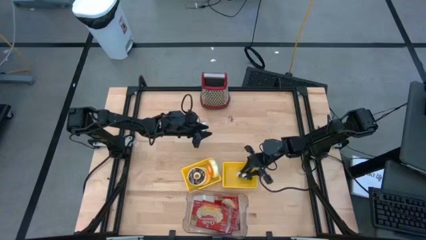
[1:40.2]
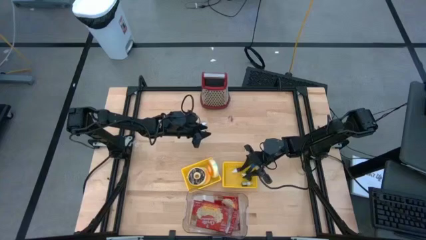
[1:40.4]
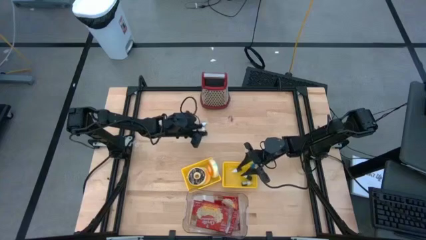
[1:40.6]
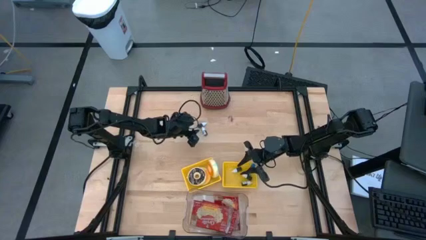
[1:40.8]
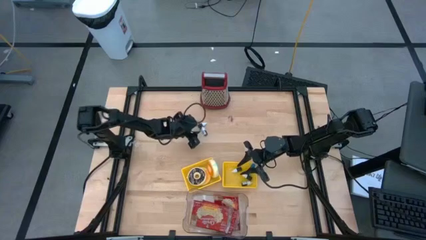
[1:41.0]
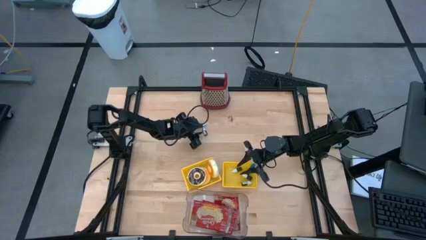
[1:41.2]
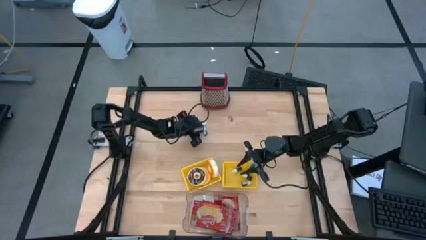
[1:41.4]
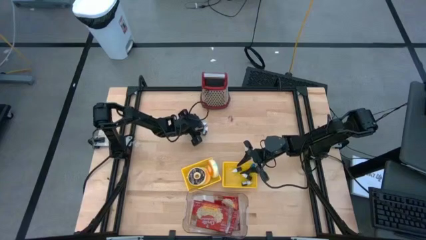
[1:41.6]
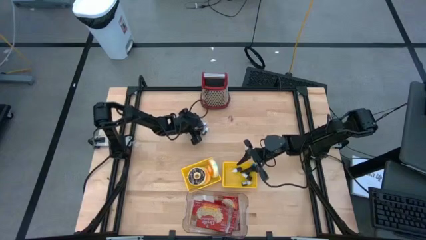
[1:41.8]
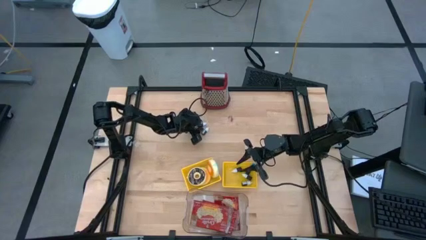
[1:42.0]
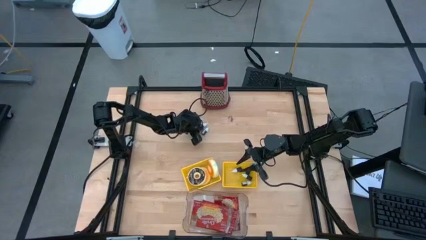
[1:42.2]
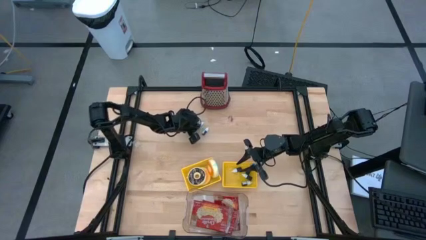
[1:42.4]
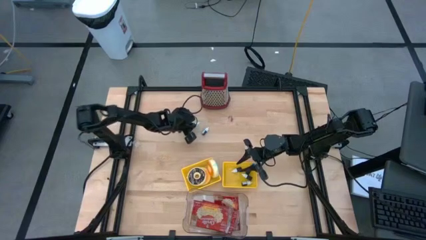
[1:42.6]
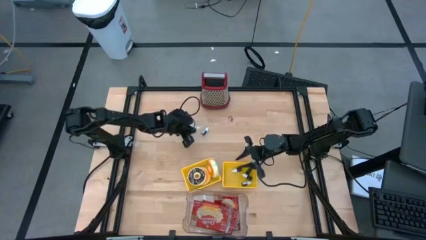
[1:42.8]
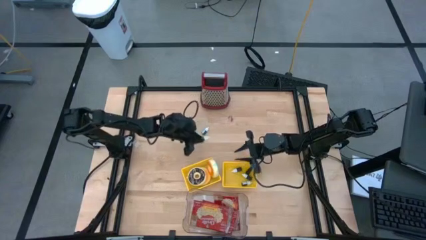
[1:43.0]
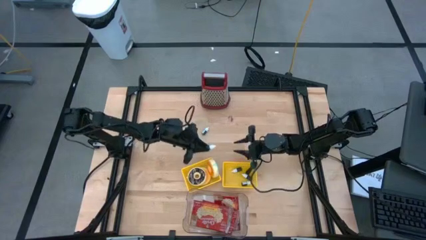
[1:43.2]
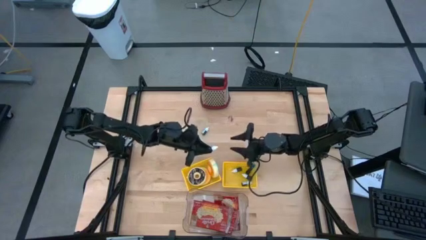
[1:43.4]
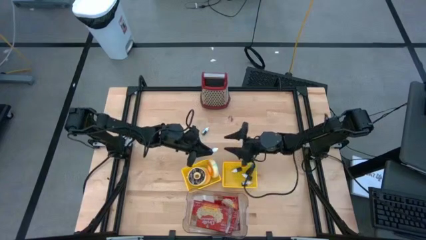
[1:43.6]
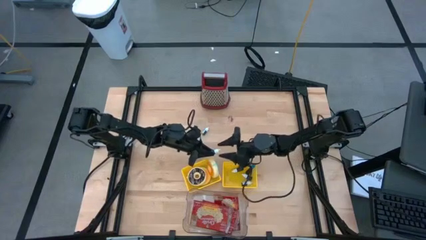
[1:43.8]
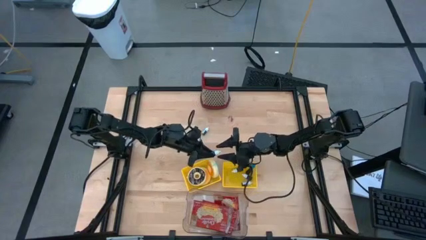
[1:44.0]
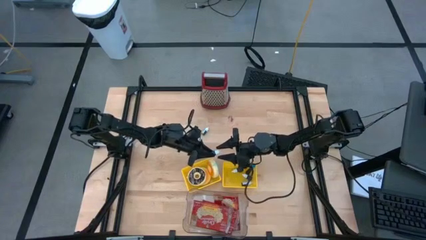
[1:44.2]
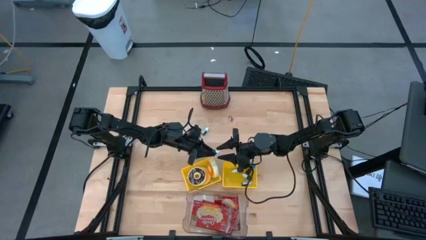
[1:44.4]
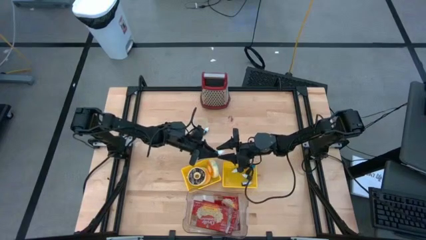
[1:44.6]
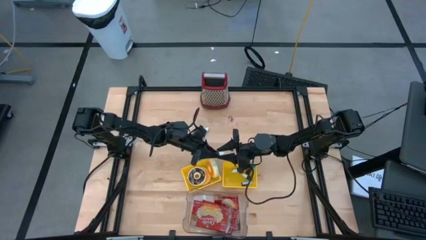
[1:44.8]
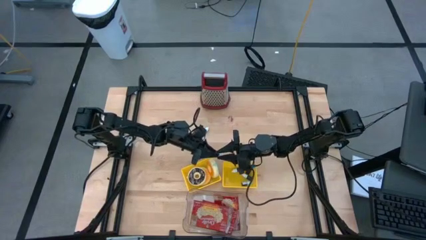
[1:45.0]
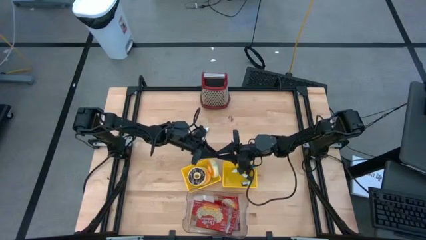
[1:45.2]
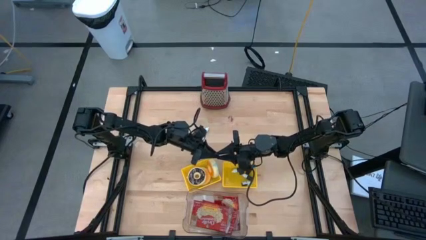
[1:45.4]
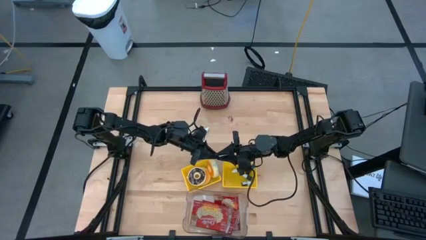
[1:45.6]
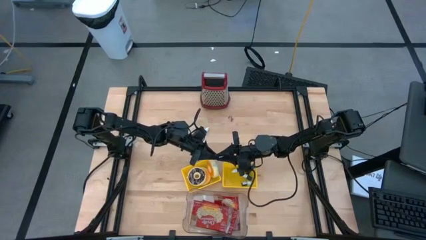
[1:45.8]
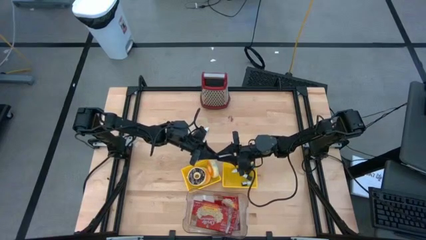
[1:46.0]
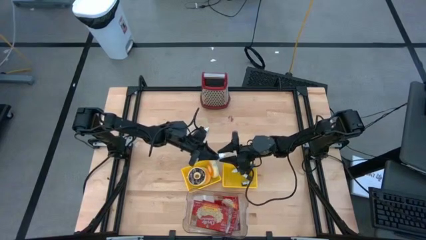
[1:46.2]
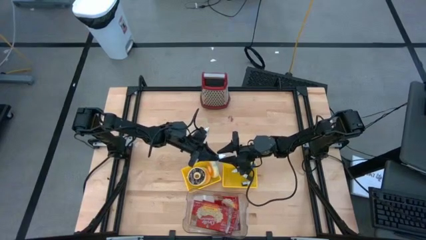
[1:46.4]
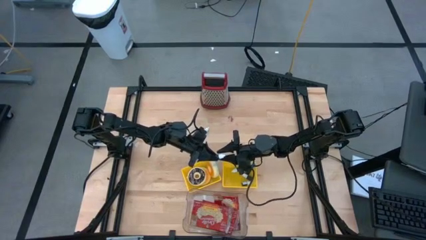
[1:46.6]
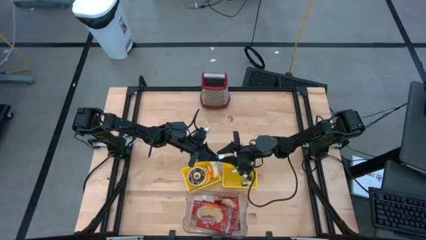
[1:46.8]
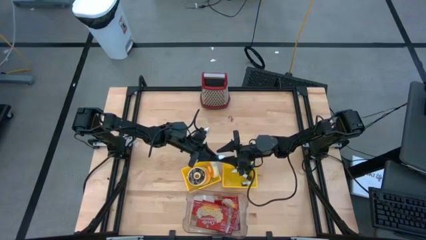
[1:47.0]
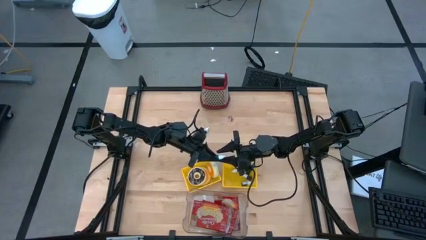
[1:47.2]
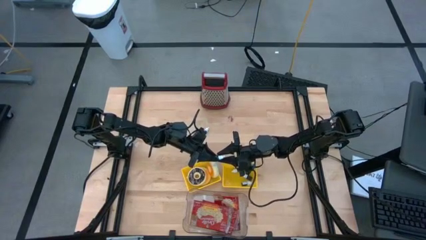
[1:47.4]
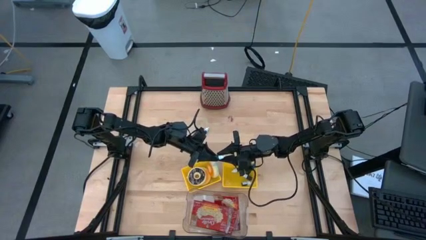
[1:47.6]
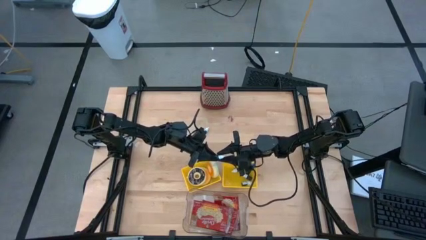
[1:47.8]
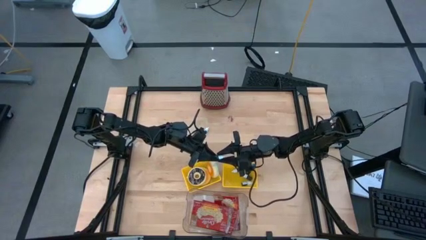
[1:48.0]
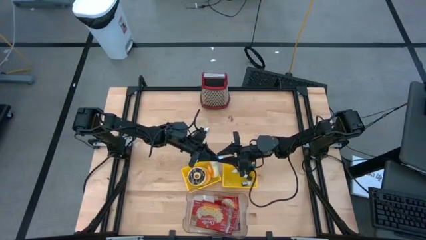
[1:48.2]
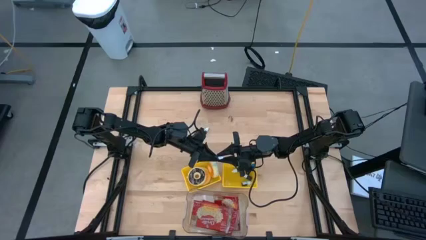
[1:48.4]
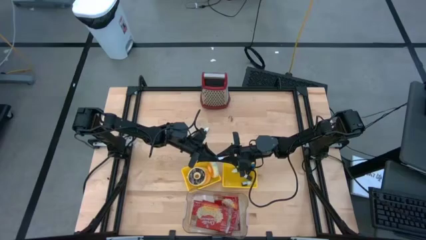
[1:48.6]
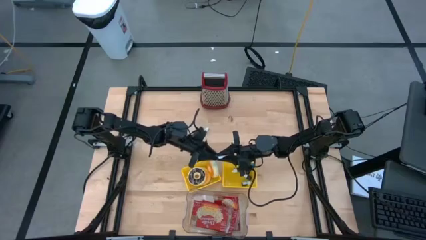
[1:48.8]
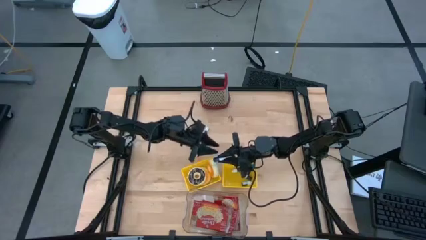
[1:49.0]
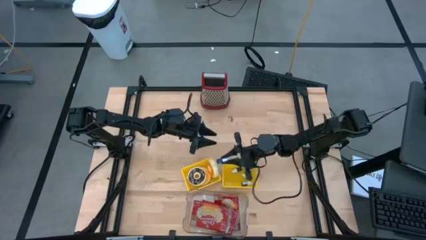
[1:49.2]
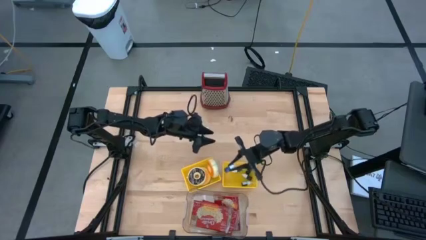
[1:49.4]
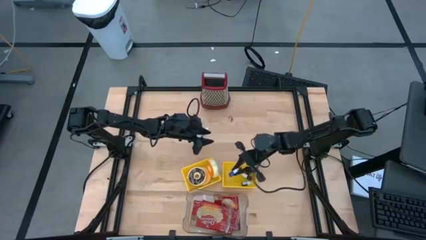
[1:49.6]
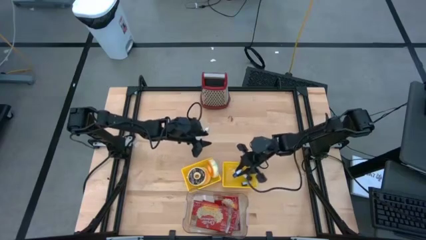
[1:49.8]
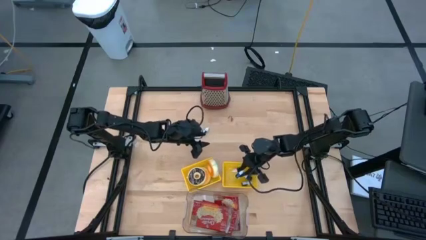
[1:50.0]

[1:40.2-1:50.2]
Put the blue food coloring bottle into the right yellow bin

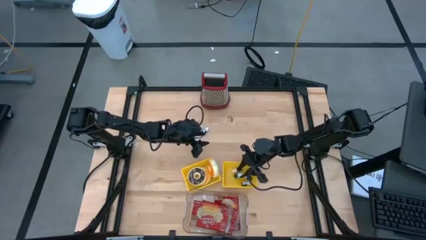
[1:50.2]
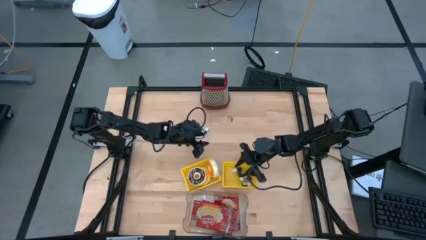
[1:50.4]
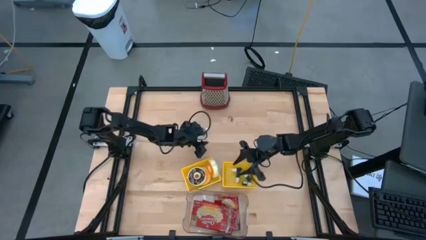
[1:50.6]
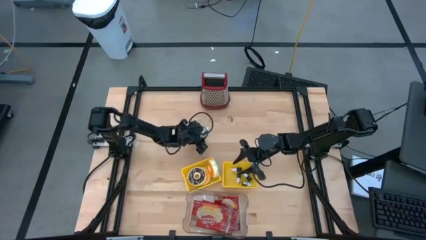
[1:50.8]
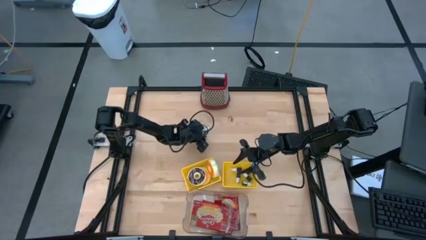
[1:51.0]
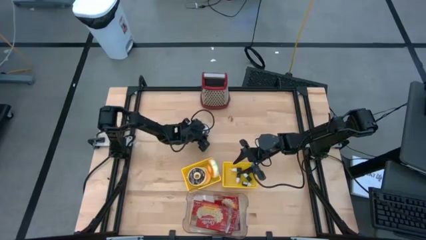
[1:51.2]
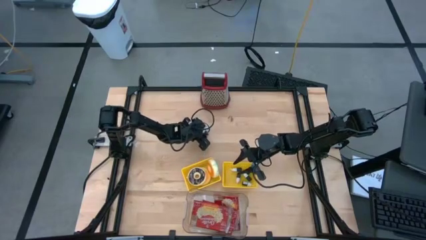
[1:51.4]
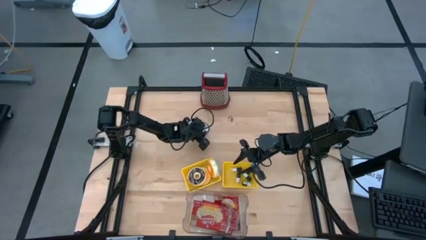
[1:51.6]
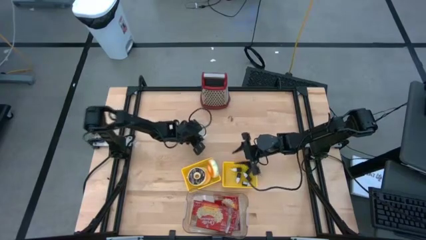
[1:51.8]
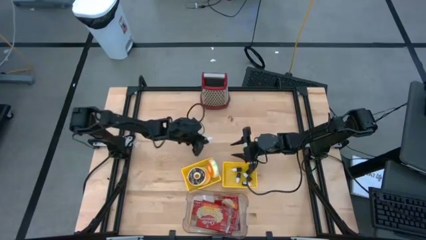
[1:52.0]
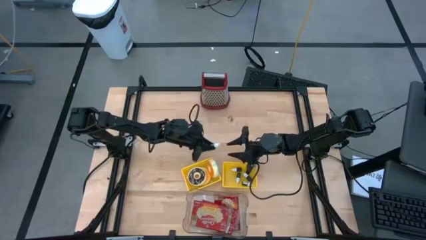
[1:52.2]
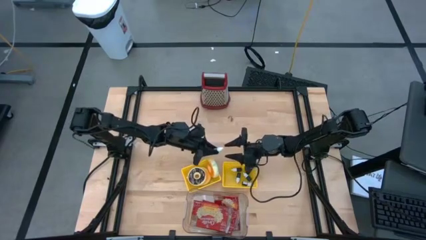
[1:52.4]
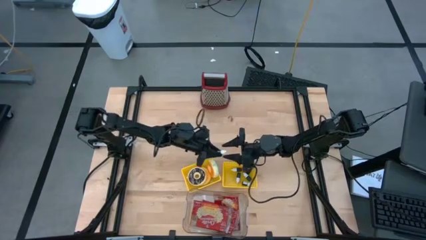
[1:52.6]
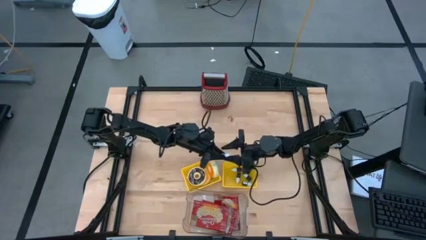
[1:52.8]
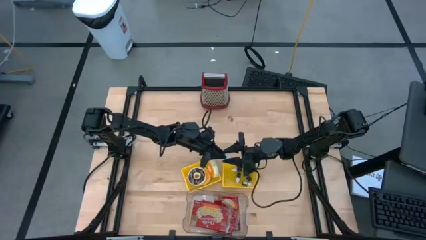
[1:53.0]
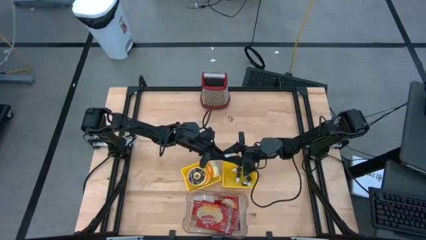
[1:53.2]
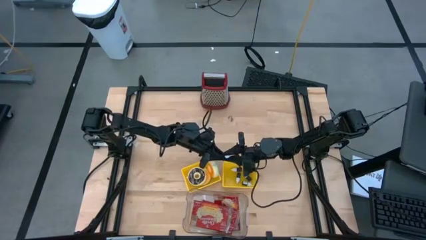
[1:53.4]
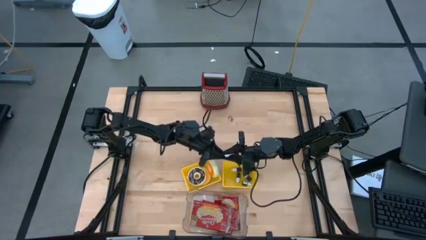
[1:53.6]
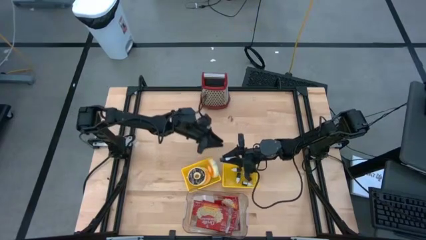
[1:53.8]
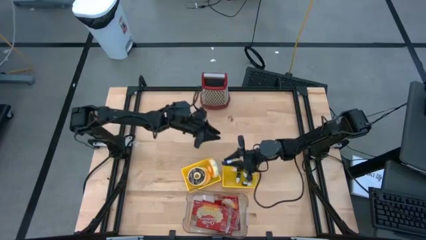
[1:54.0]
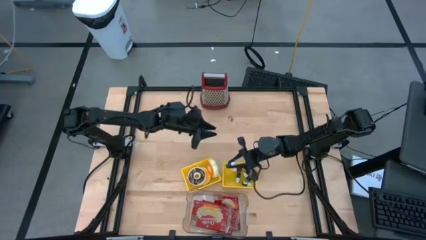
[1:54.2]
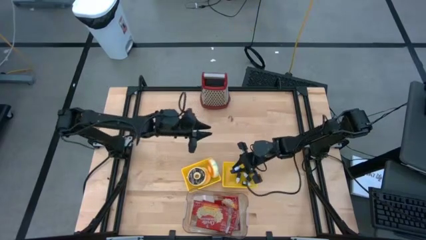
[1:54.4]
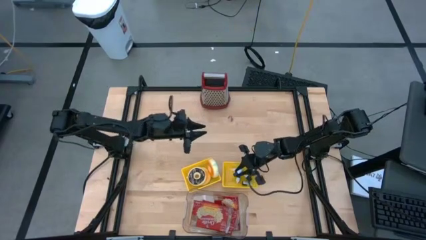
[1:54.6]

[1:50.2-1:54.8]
Put the black food coloring bottle into the right yellow bin
